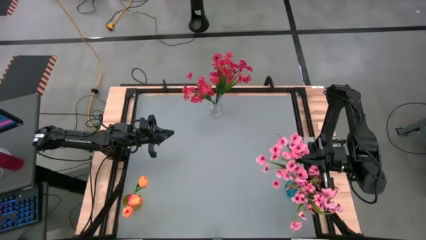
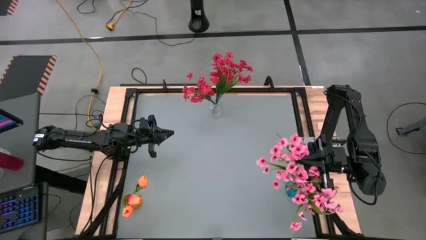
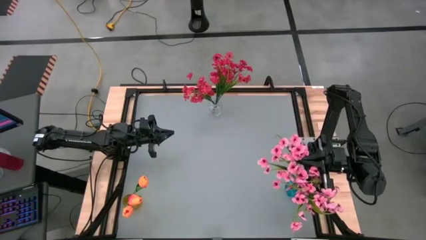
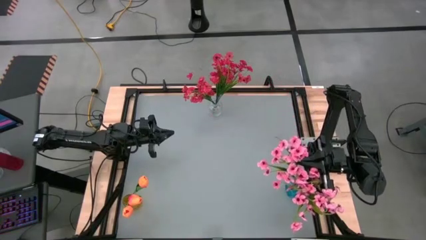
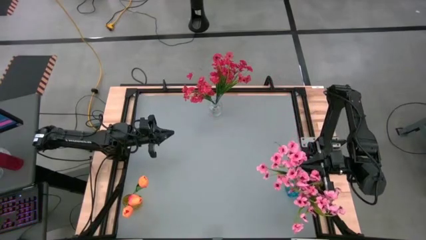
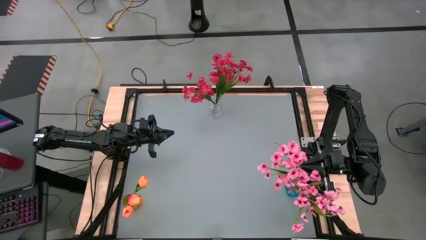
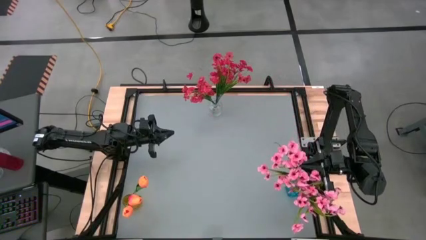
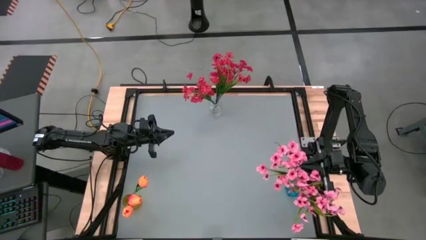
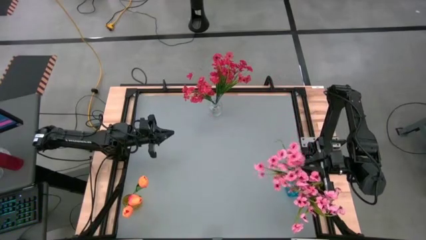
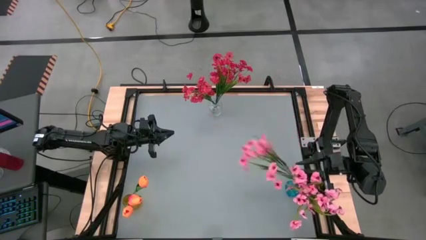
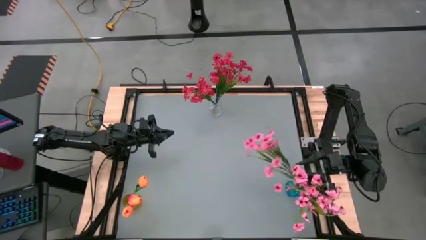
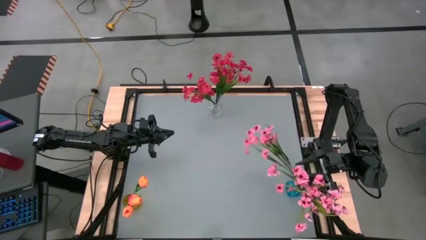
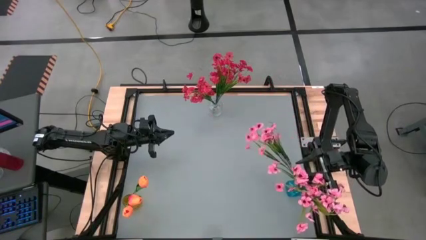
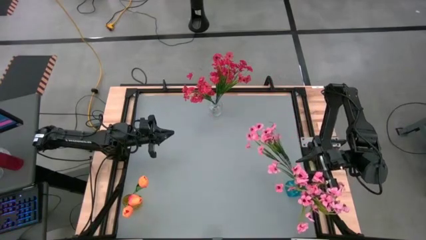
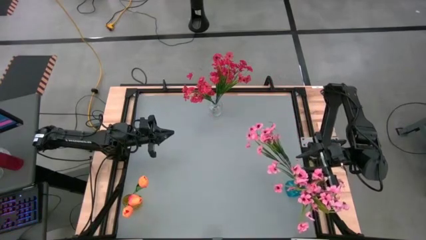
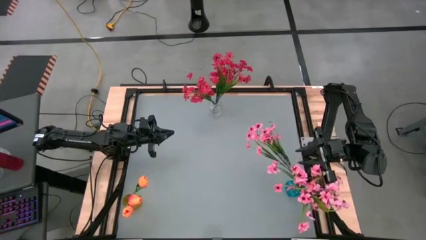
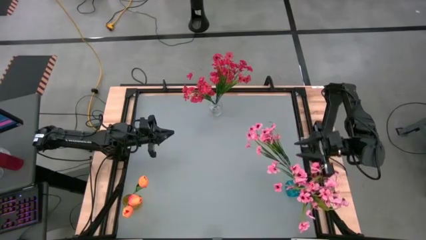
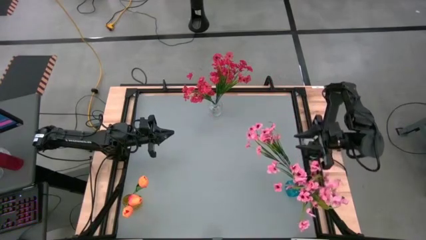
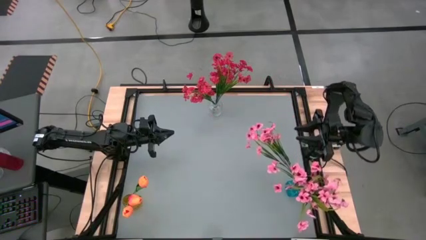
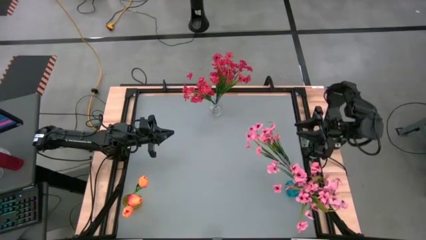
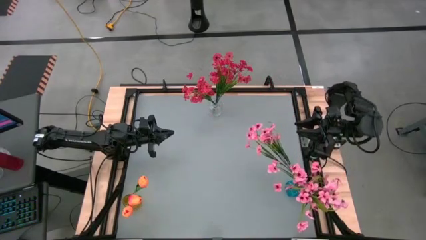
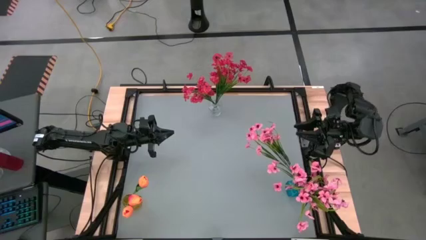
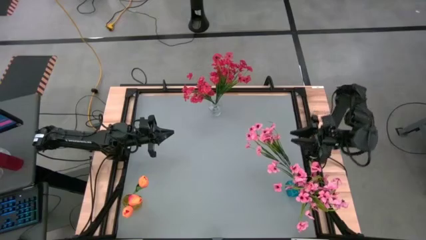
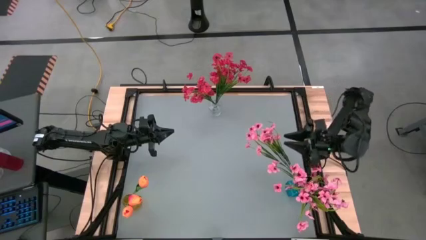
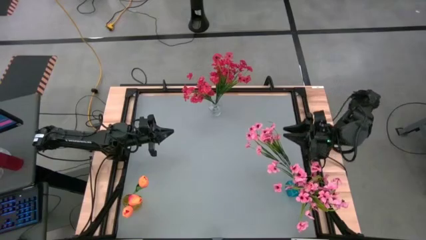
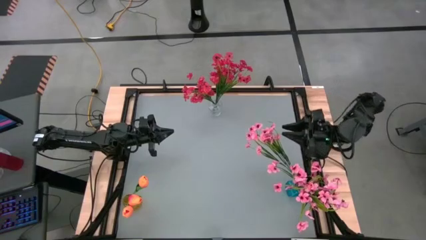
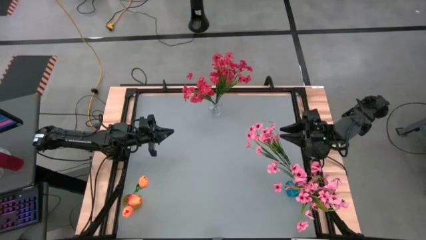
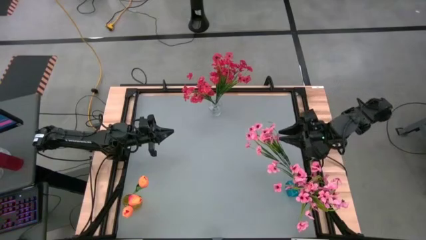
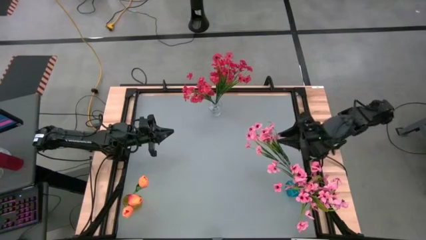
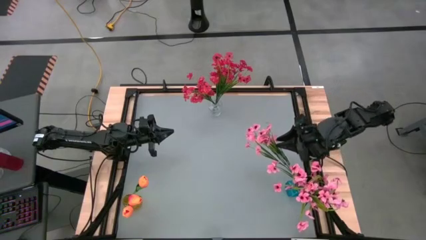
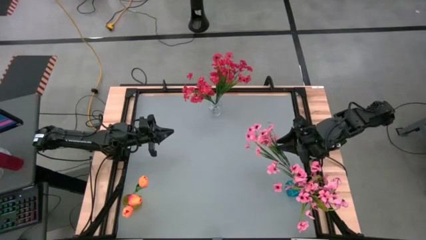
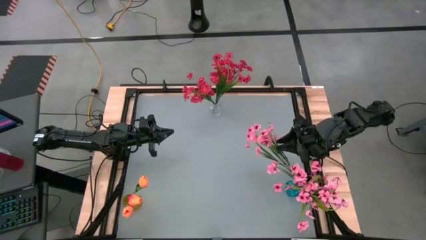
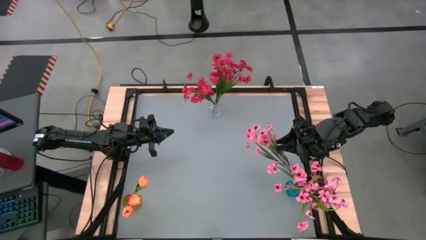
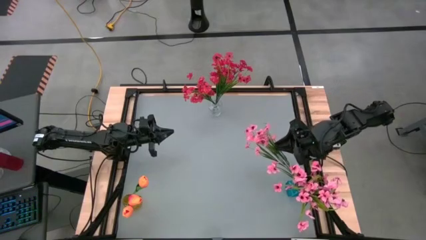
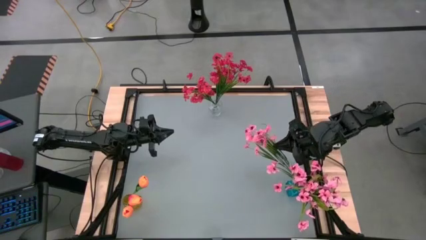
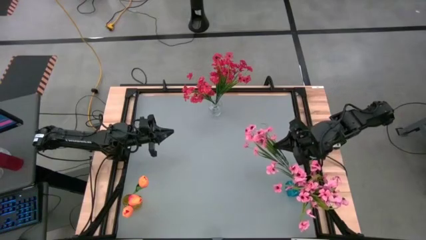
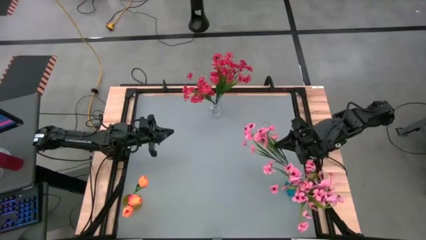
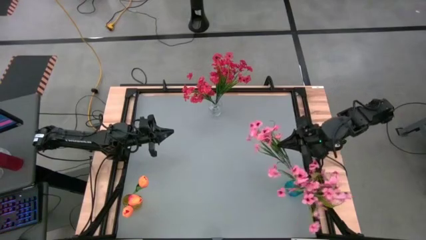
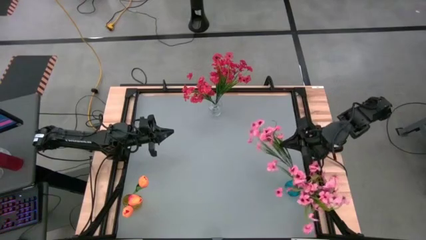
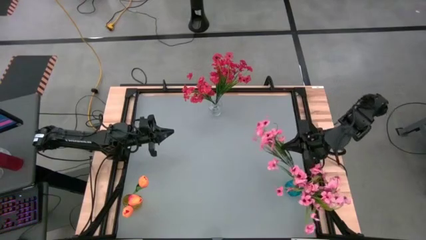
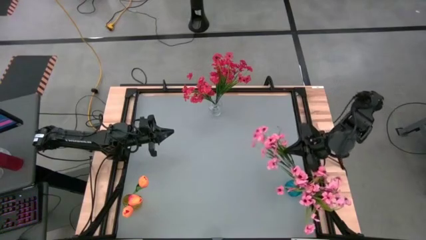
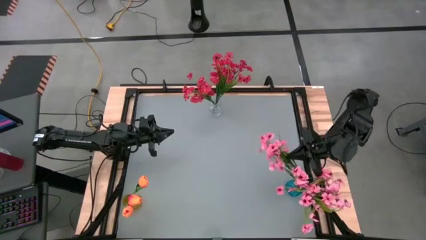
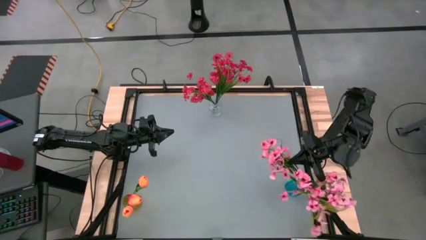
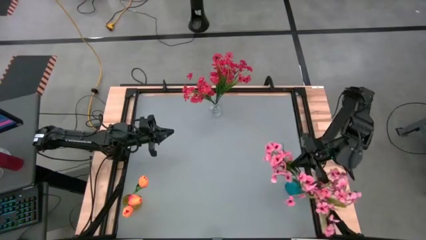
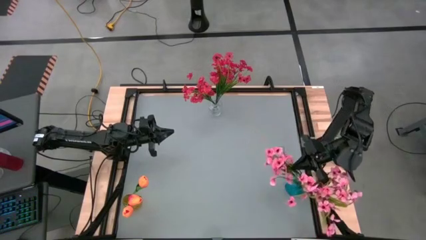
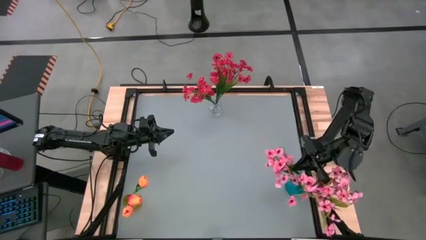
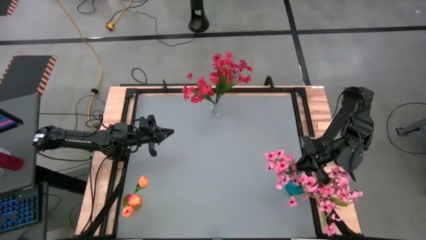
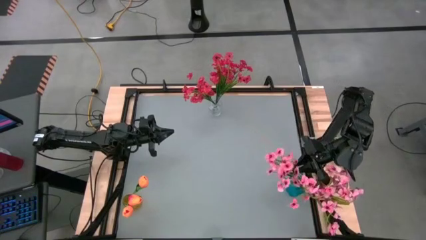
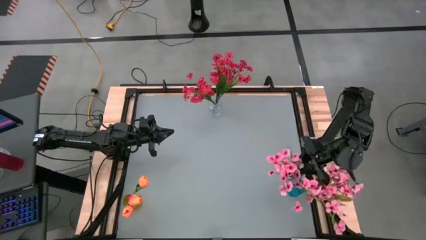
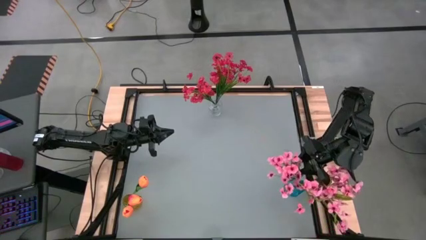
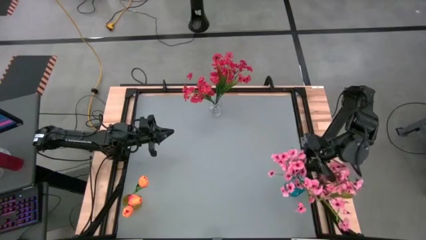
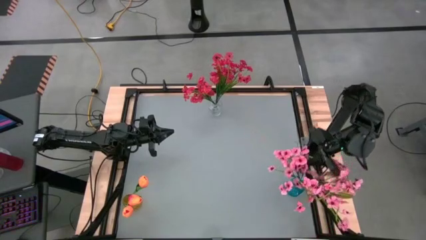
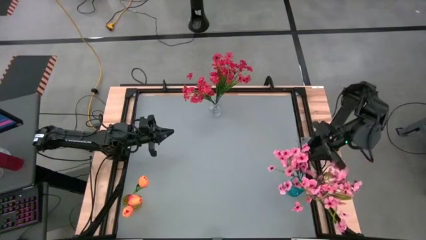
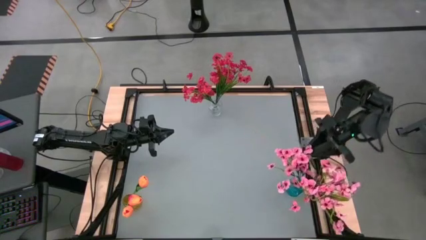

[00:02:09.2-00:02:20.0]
Task: Sort flowers into vase by color
Put the pink flowers into the blue vase

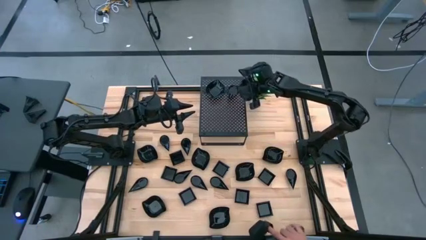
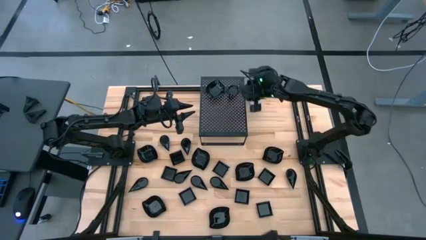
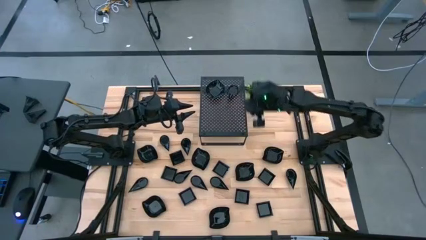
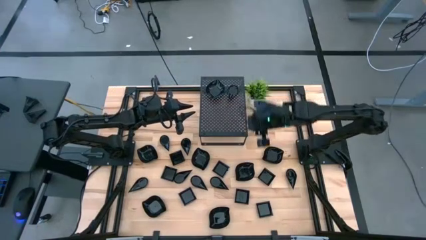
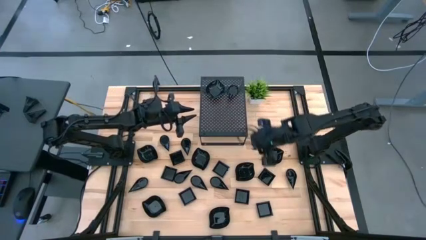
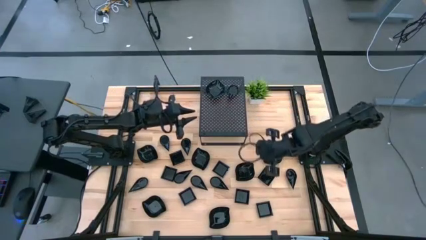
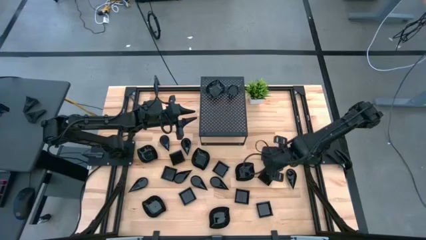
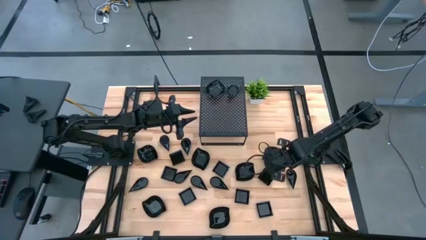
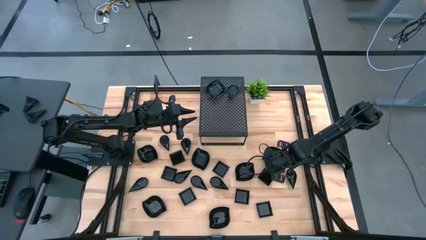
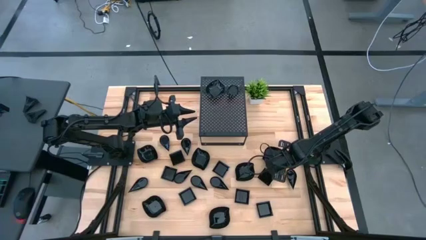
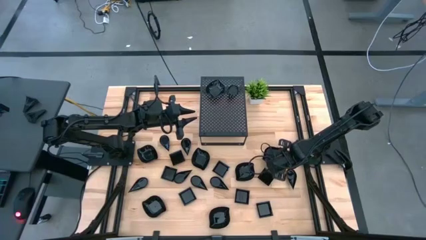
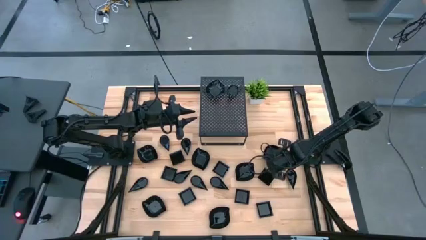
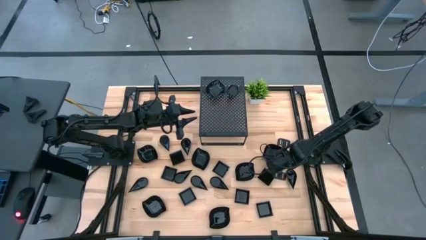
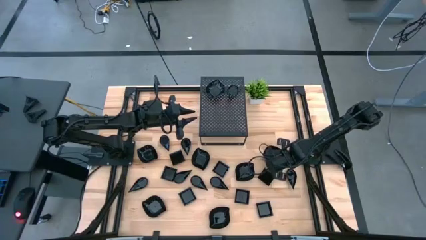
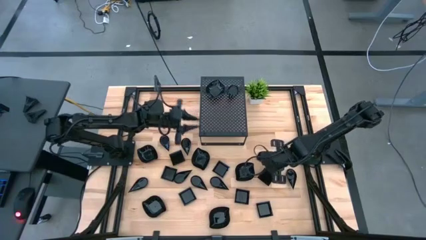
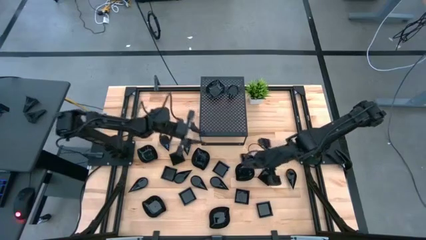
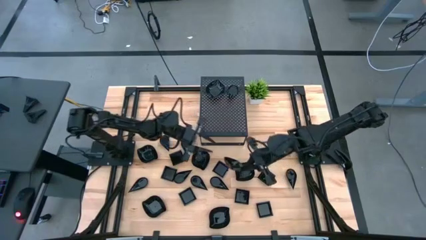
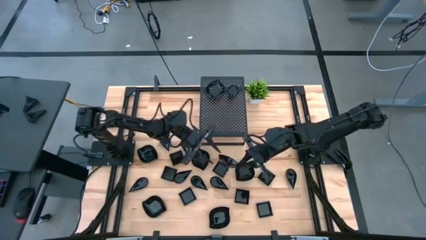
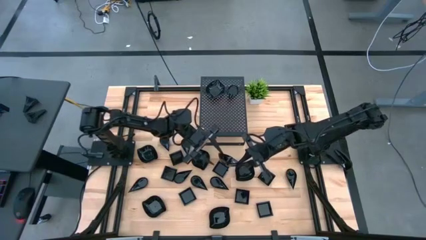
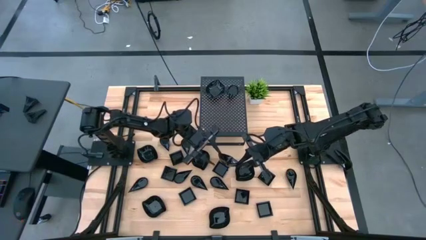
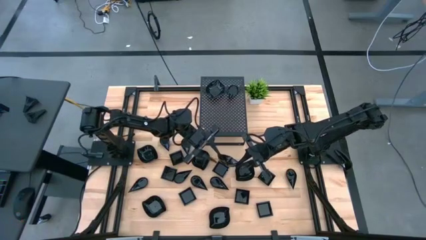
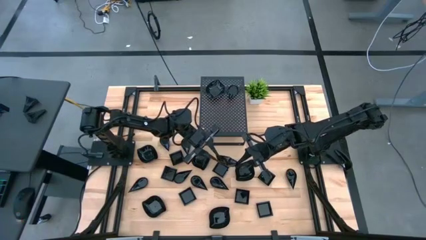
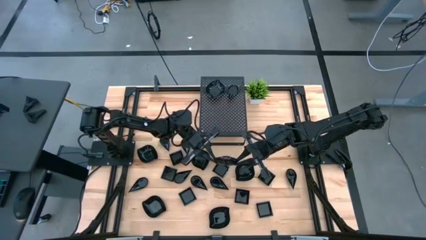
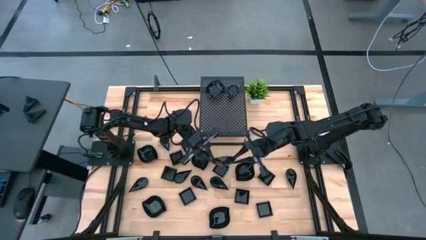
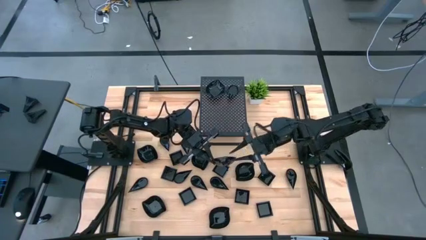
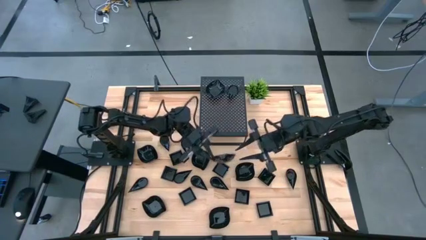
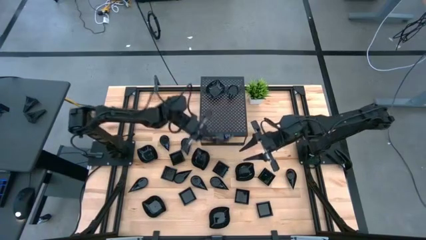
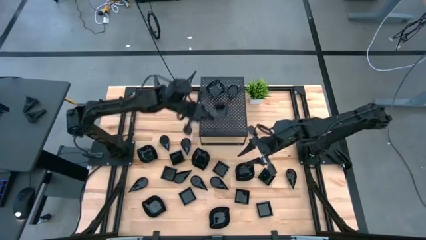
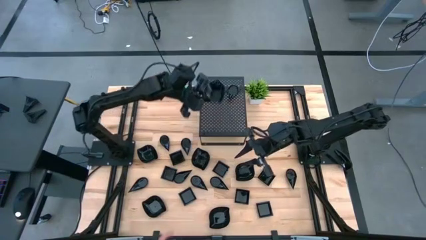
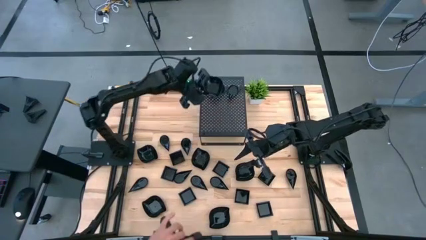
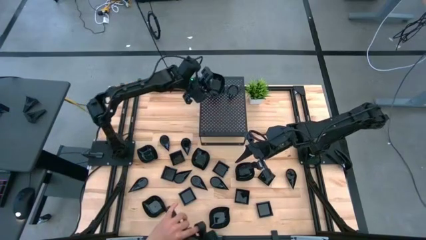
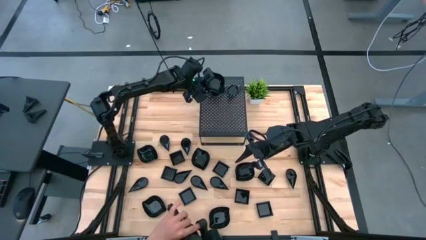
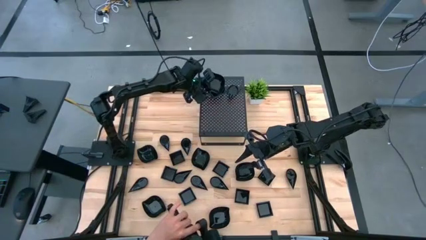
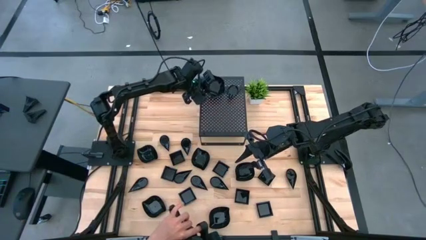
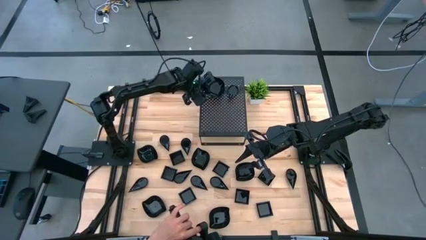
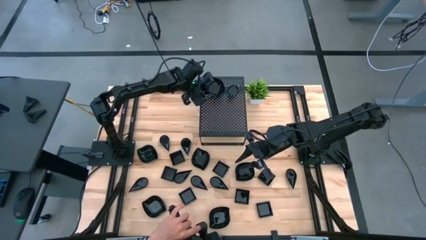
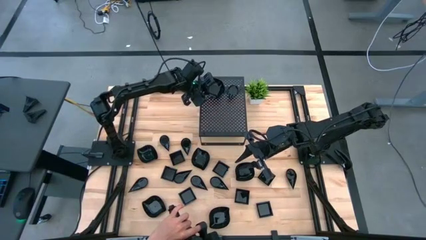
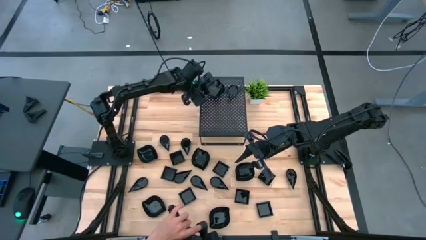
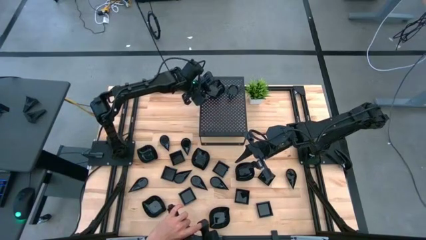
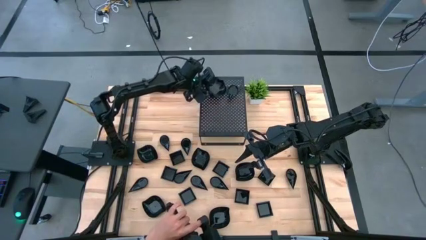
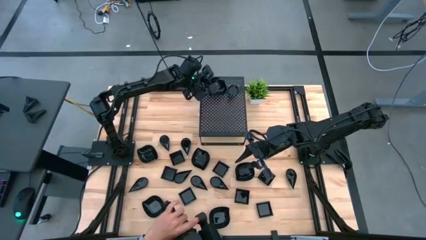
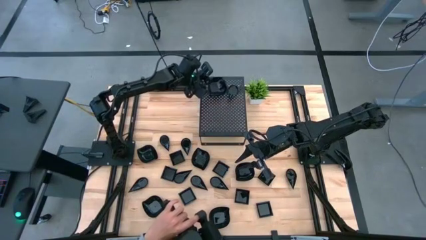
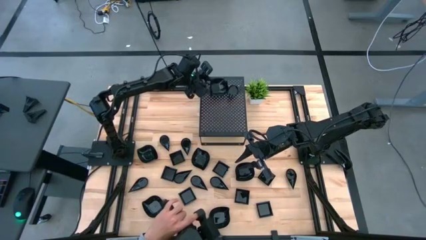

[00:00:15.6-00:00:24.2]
Task: Pick & Place Mini shaped plates
Stack the black leaf-shaped plate on top of the black leaf-shaped plate on the shelf
